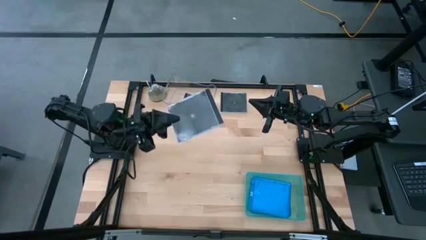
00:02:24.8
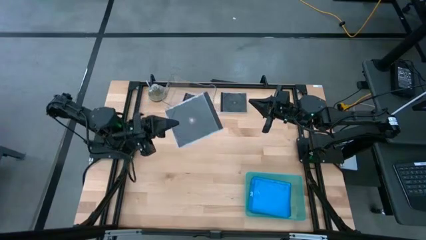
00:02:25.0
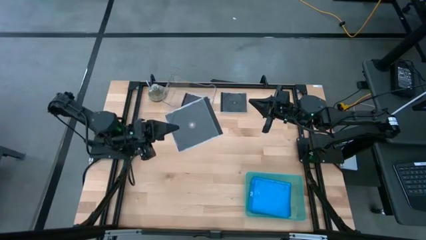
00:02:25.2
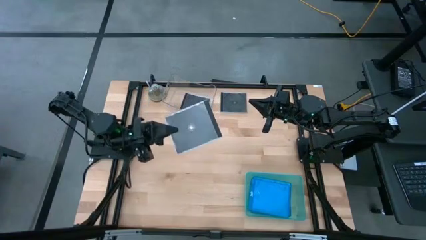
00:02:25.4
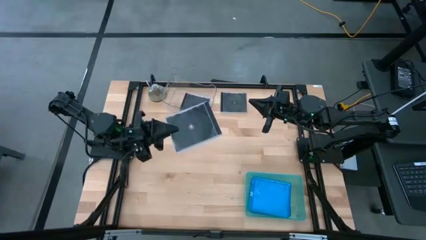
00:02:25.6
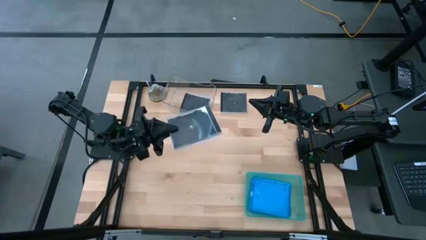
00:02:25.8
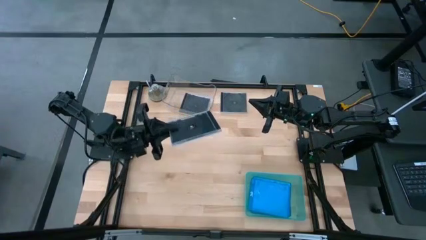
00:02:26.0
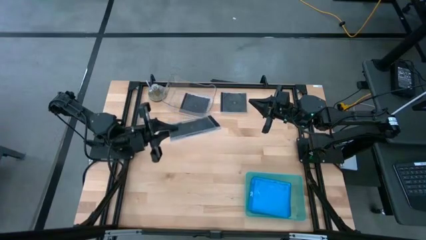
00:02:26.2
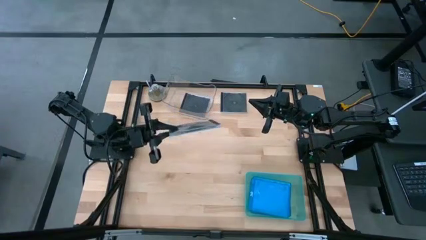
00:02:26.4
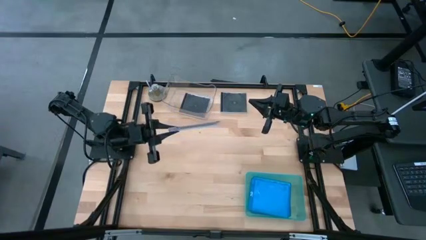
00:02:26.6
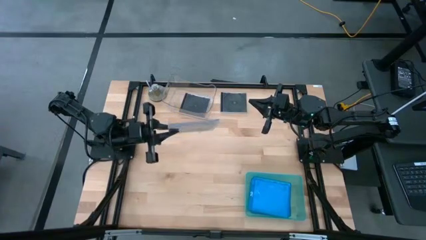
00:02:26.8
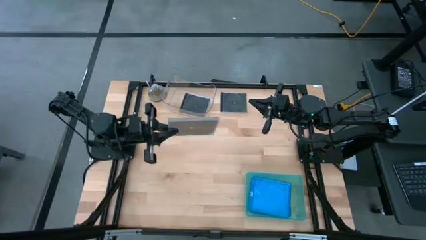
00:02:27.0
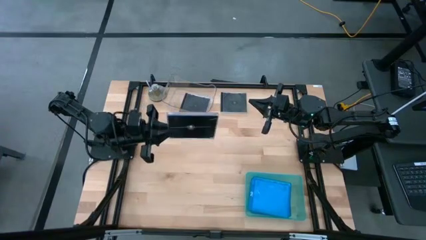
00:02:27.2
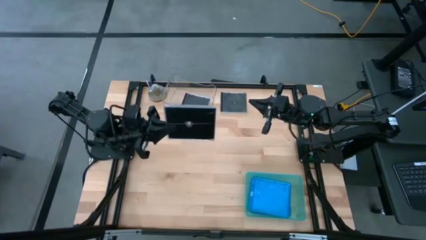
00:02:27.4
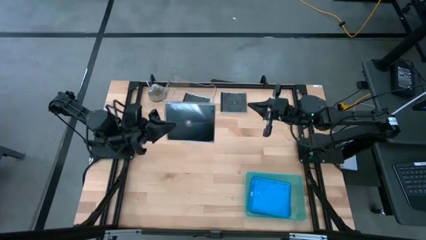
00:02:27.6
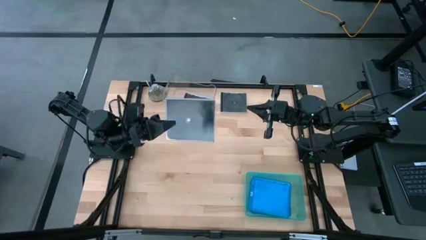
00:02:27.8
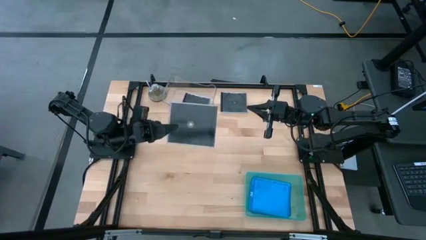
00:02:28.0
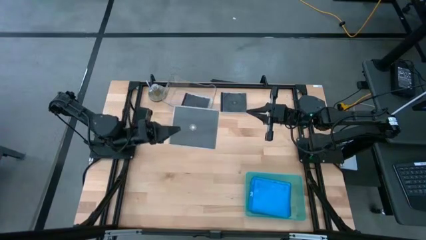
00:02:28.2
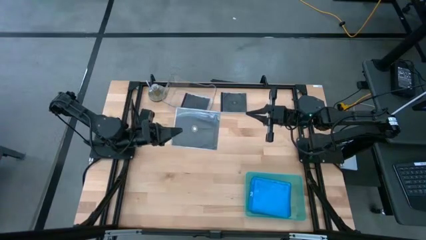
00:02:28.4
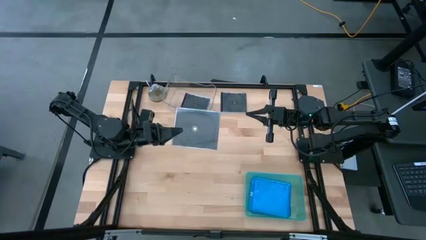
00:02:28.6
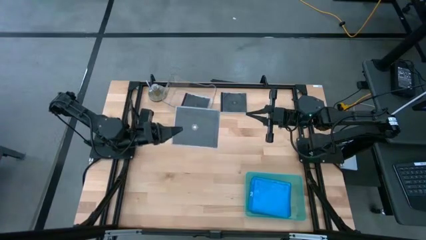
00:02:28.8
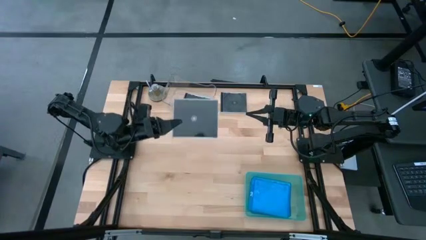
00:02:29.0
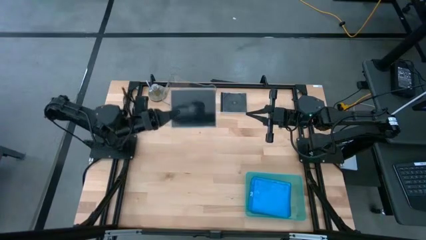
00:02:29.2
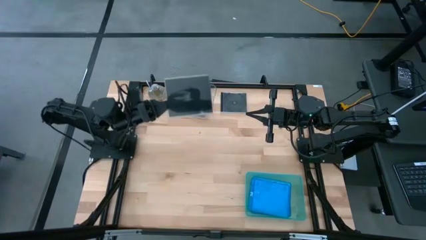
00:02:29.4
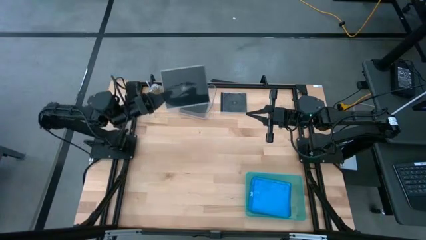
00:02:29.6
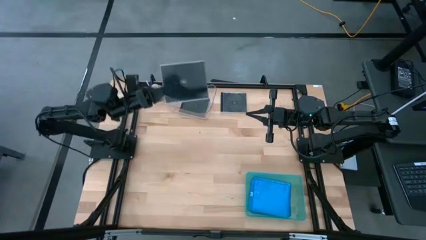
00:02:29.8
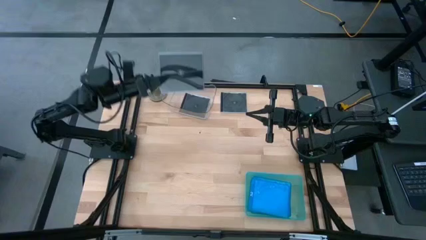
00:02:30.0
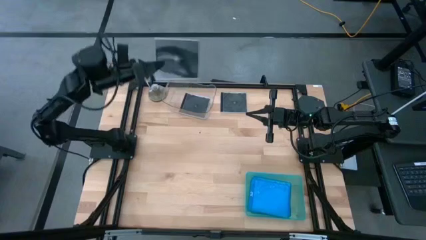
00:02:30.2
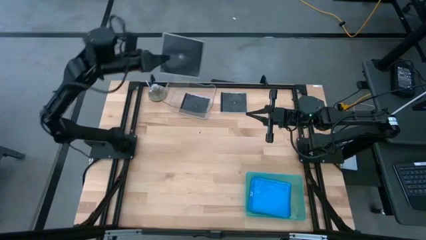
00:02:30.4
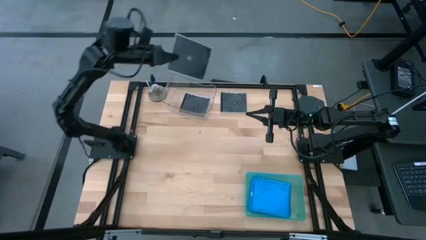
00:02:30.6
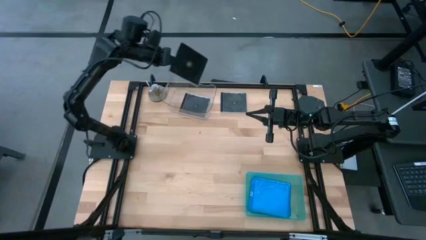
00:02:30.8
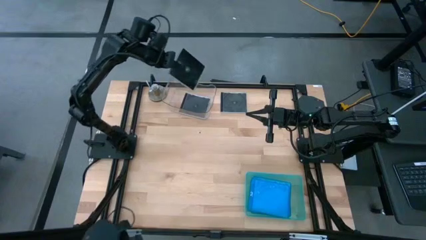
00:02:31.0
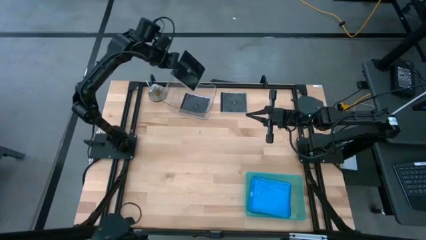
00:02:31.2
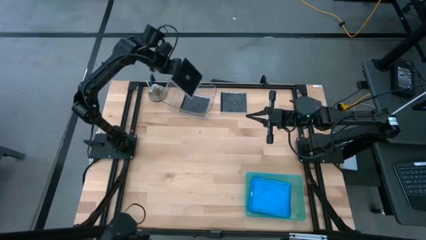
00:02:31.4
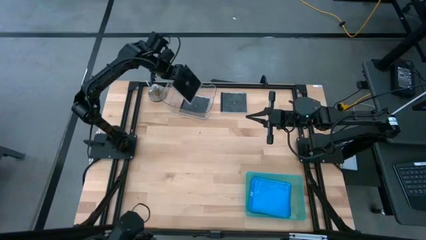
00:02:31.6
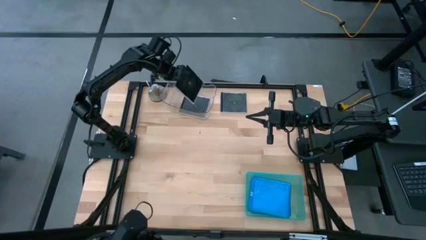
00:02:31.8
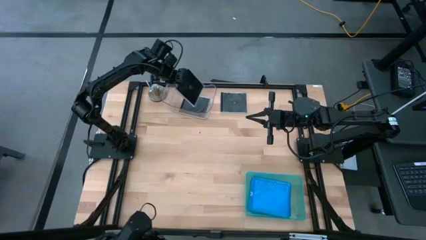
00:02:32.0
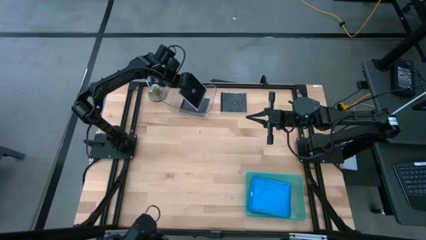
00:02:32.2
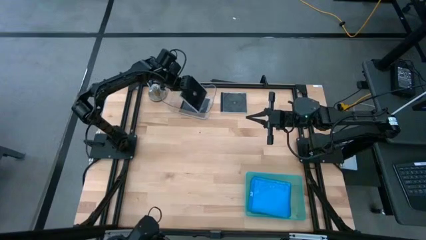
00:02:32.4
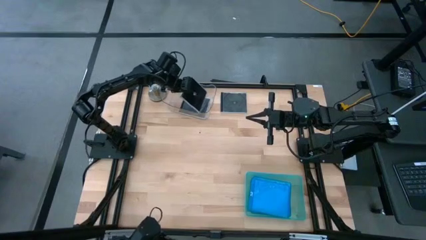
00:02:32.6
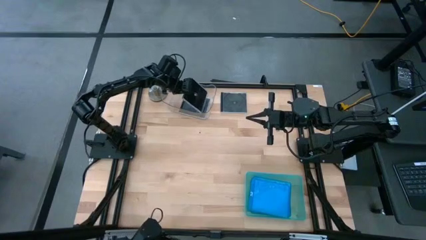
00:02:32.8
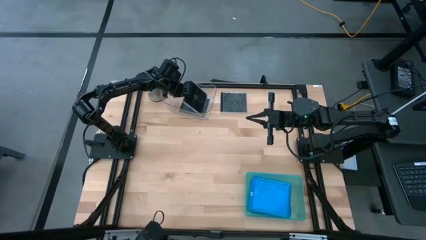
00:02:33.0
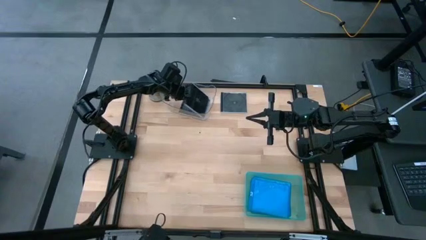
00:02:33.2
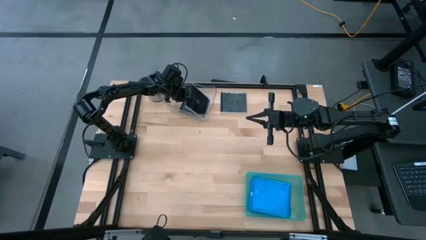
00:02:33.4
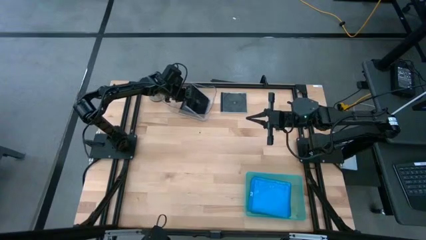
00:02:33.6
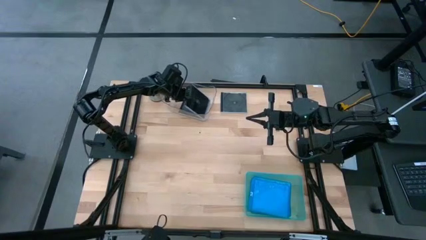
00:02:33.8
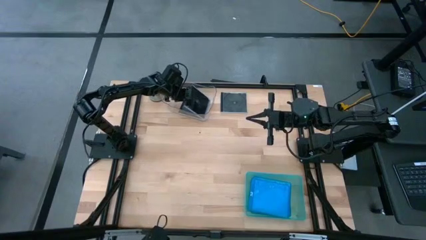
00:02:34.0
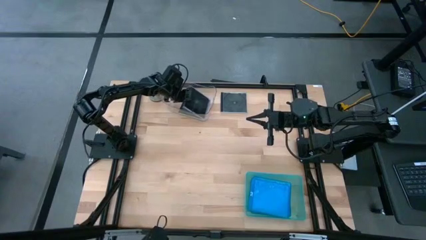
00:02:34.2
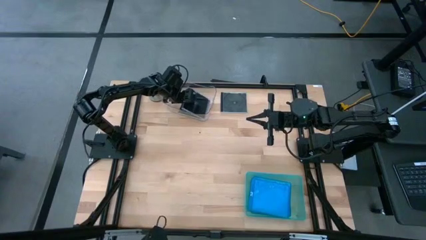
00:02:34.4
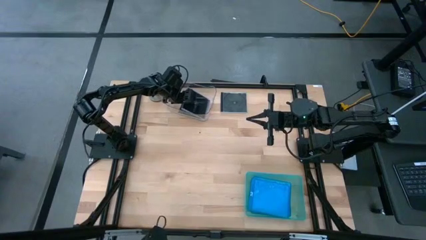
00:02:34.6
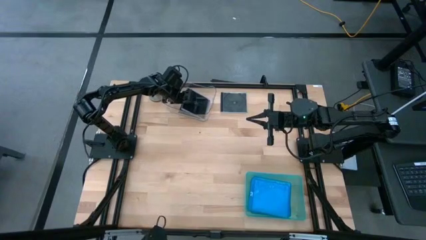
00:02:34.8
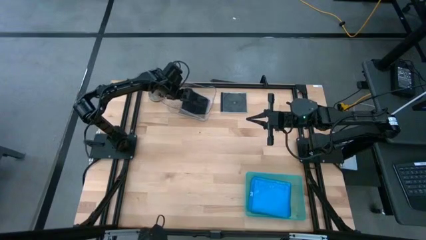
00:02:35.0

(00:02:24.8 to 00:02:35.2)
Task: Pick & place jewel cases by type
Put the bottom black cd case into the transparent bin

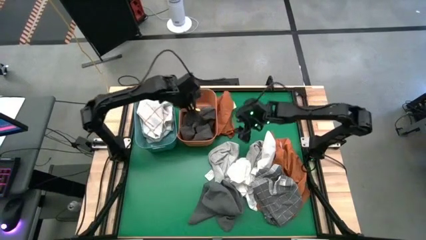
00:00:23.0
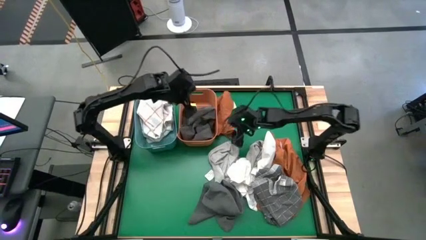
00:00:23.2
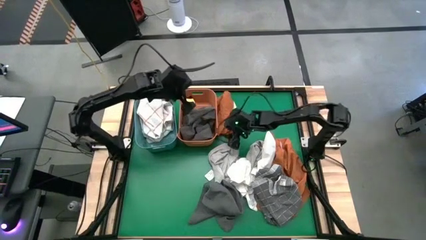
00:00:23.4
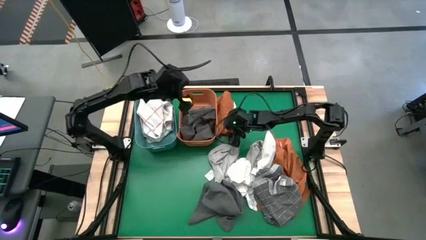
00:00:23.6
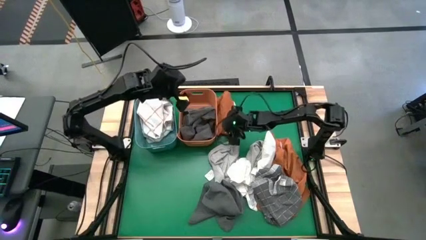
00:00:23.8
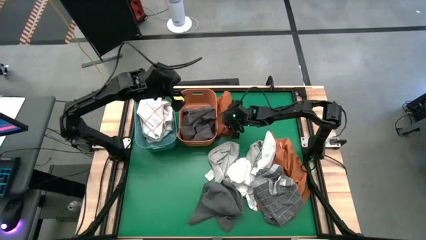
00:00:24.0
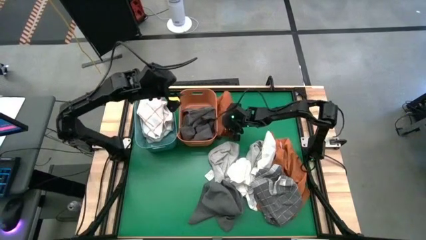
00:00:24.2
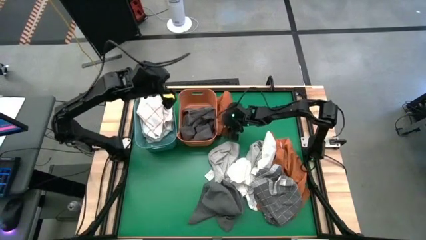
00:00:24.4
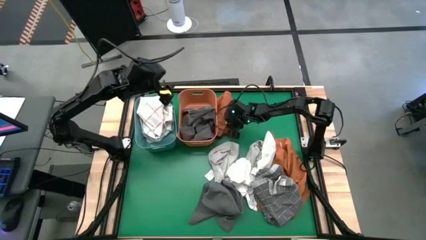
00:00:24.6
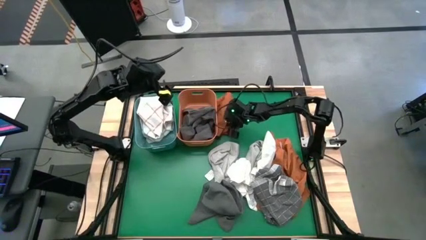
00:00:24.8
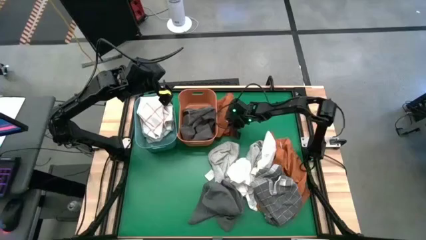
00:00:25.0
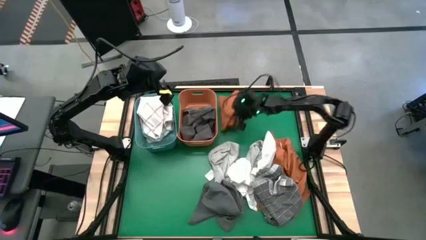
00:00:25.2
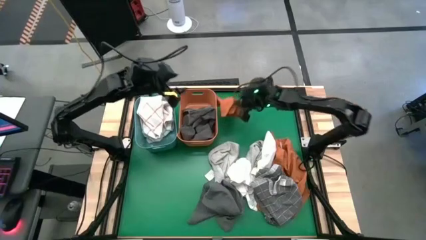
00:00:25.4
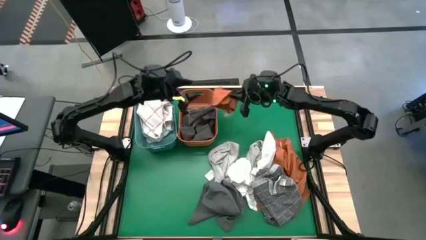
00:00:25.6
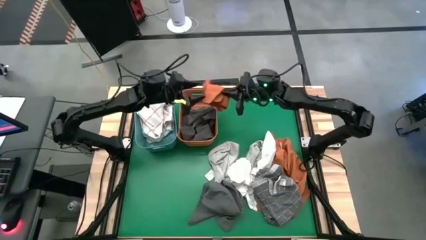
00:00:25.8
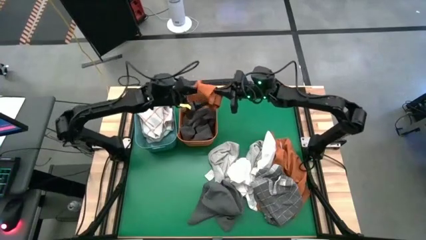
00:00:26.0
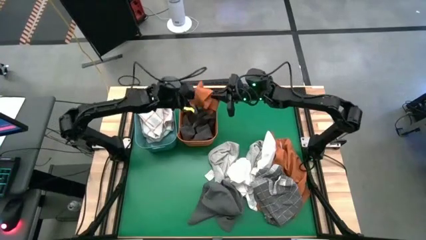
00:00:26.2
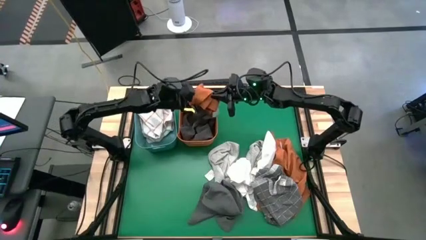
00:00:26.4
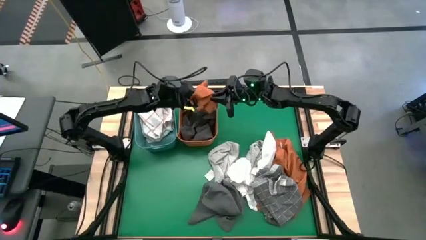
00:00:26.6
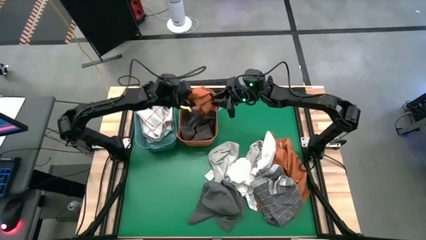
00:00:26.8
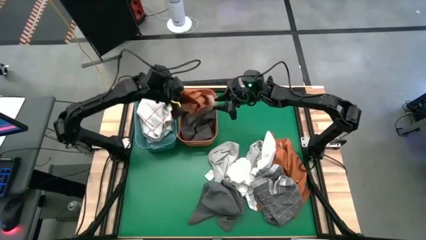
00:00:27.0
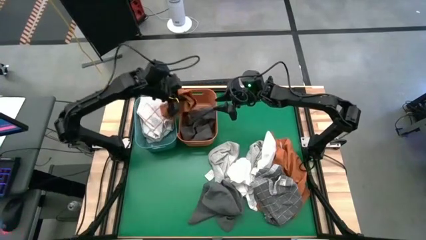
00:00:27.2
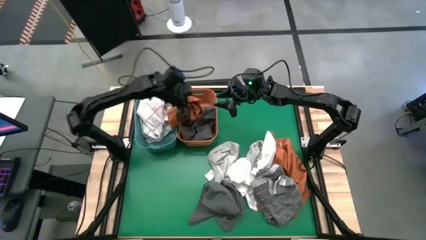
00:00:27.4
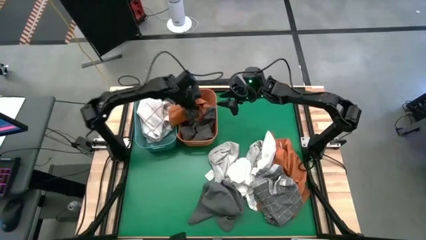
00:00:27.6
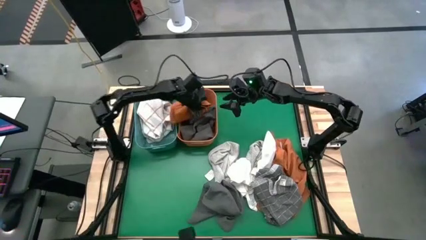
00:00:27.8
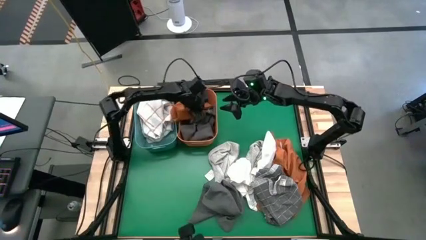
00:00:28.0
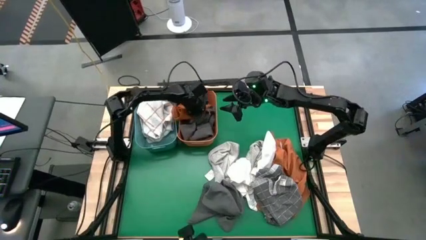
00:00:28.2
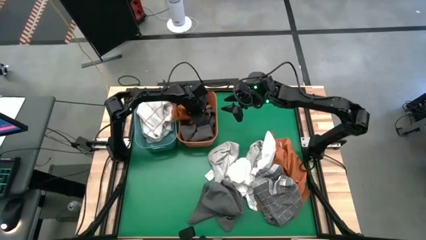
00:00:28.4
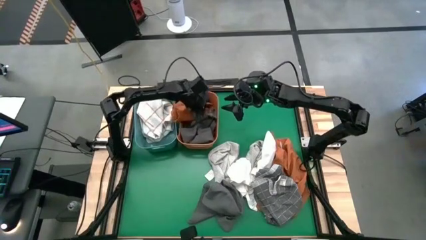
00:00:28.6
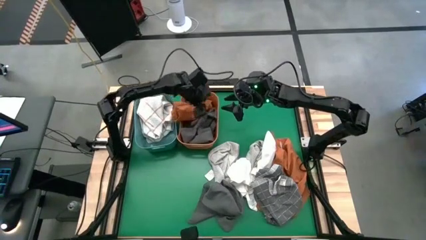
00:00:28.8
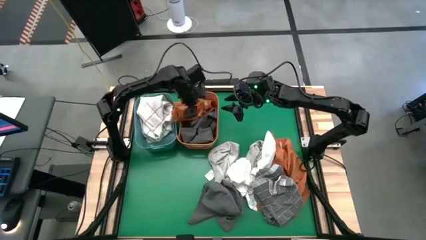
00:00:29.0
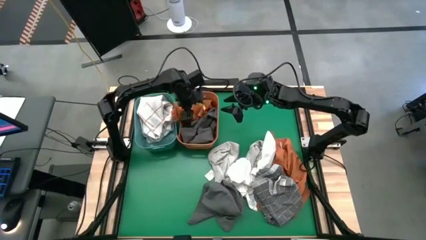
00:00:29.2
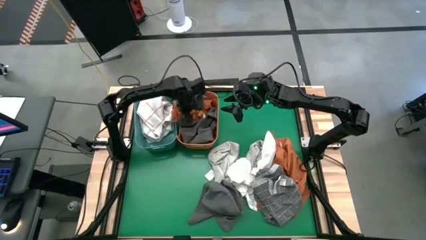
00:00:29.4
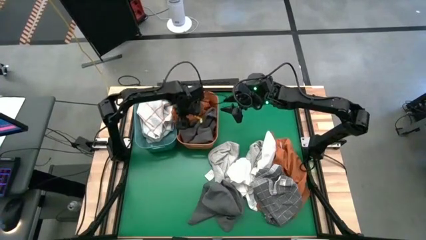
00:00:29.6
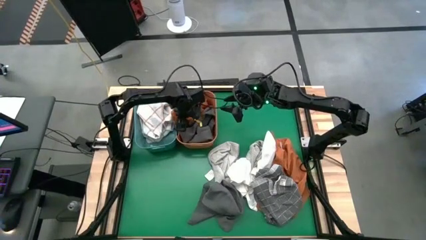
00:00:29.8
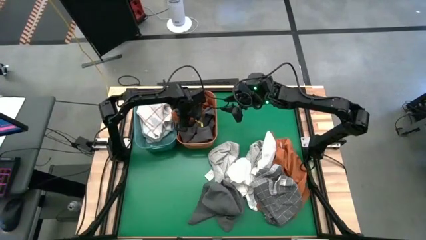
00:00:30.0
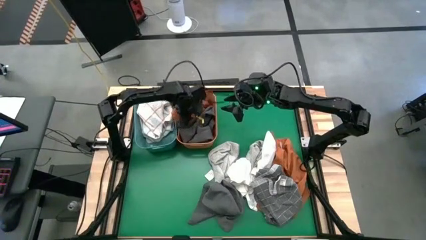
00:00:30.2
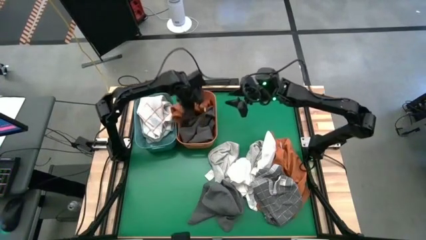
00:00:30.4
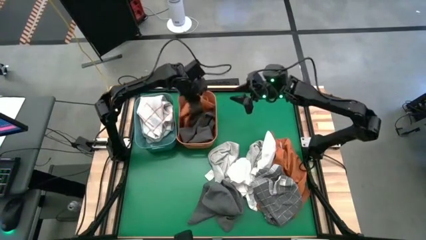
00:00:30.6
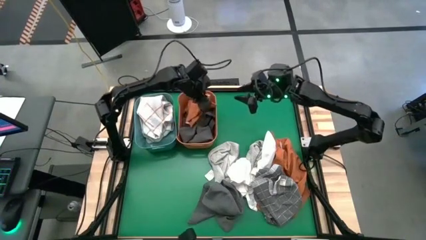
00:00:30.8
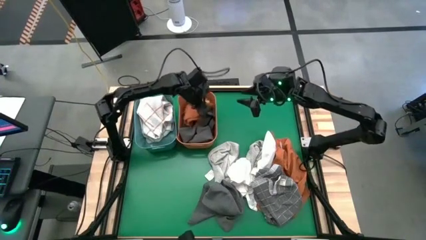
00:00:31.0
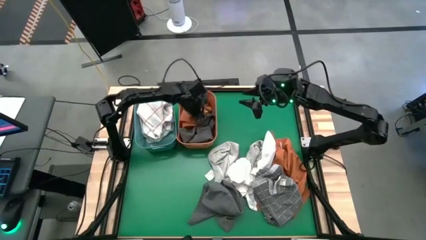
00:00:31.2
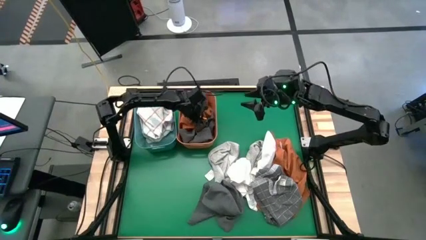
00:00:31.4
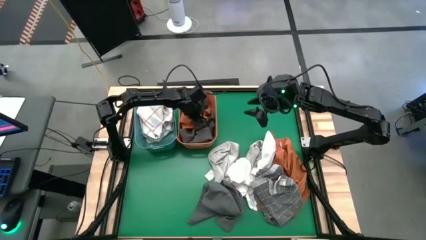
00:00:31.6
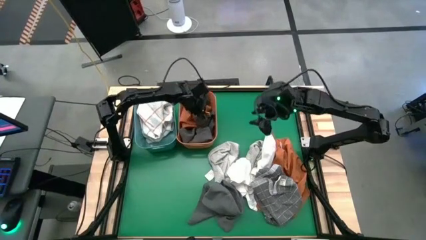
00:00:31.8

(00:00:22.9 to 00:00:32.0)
Task: Sort towels by color in basket
Put the brown towel into the orange bin
